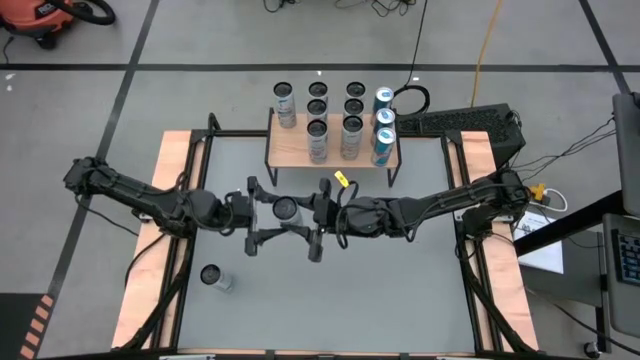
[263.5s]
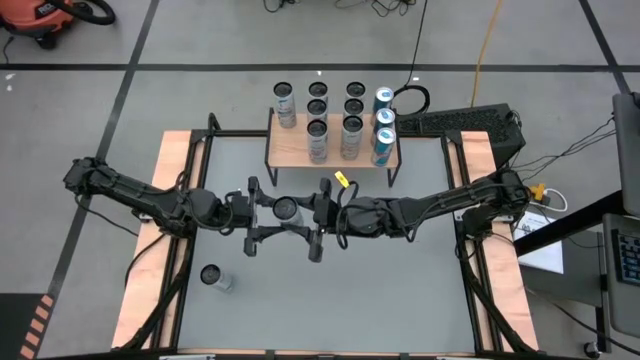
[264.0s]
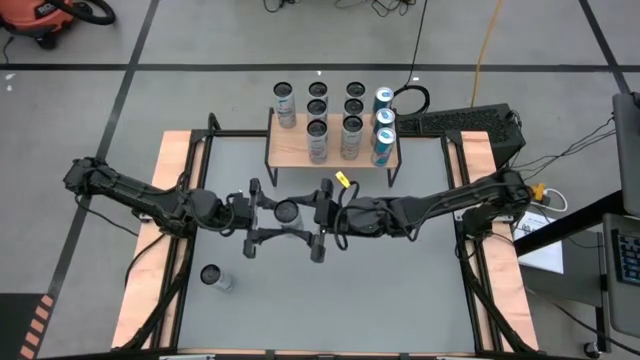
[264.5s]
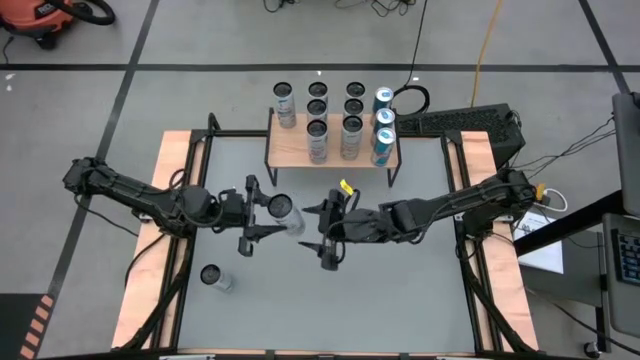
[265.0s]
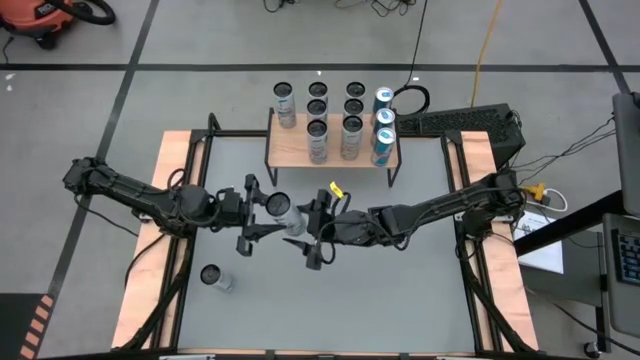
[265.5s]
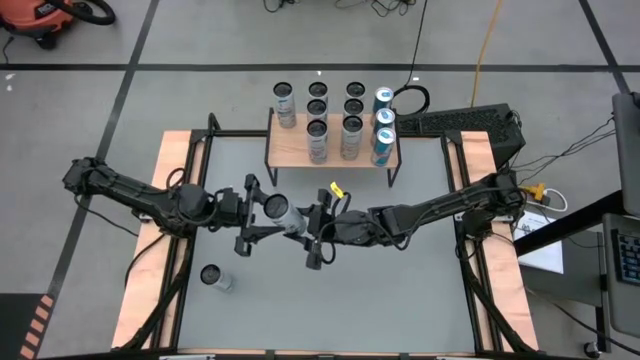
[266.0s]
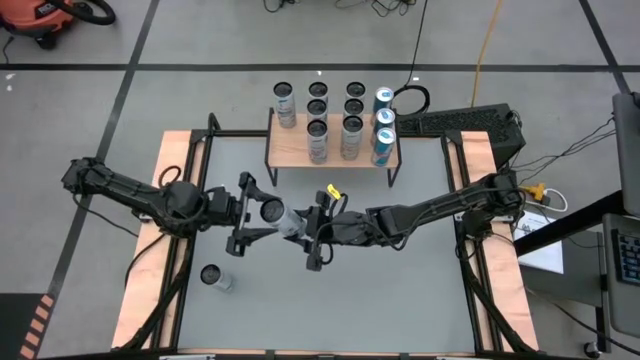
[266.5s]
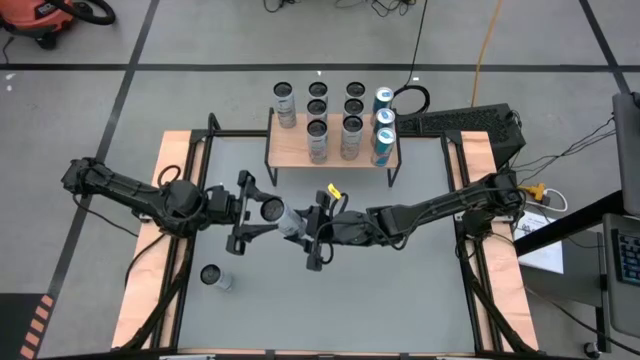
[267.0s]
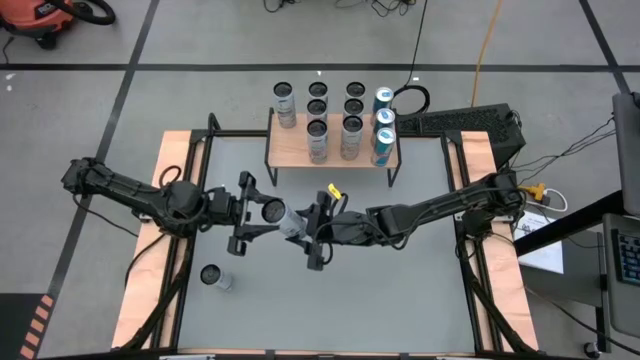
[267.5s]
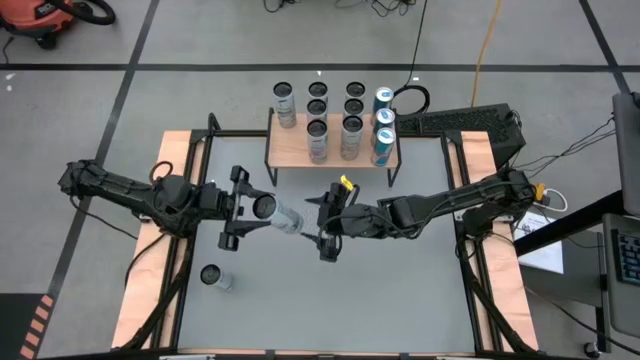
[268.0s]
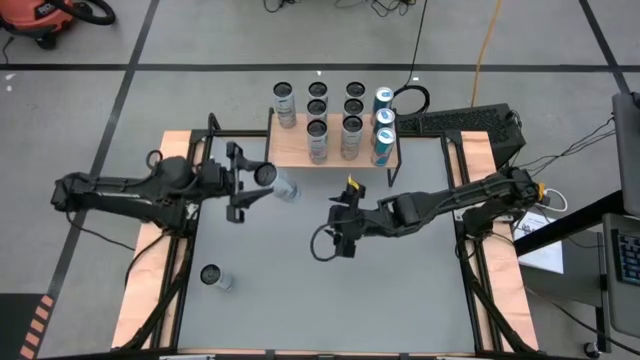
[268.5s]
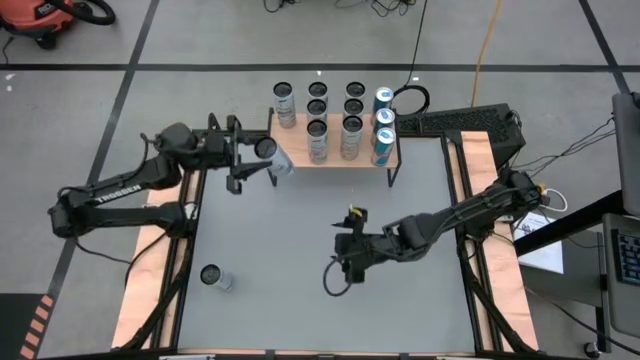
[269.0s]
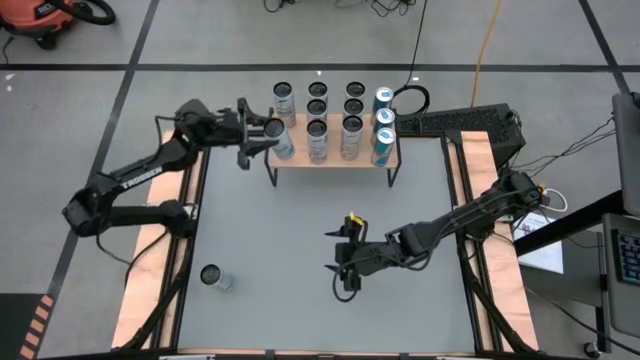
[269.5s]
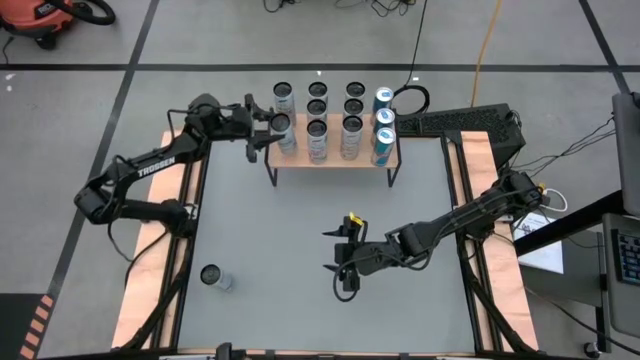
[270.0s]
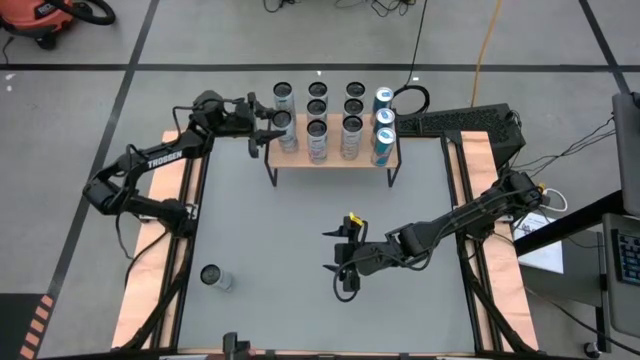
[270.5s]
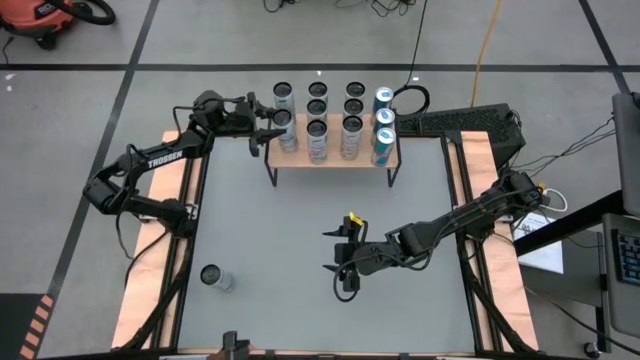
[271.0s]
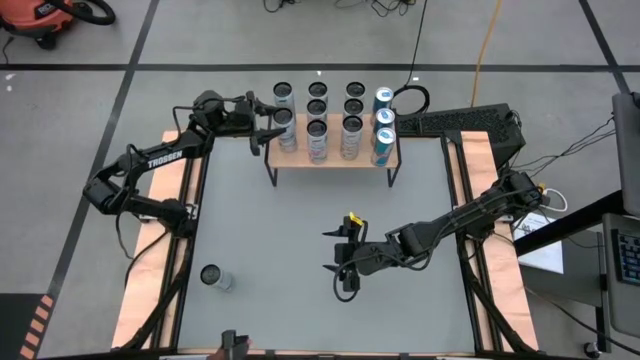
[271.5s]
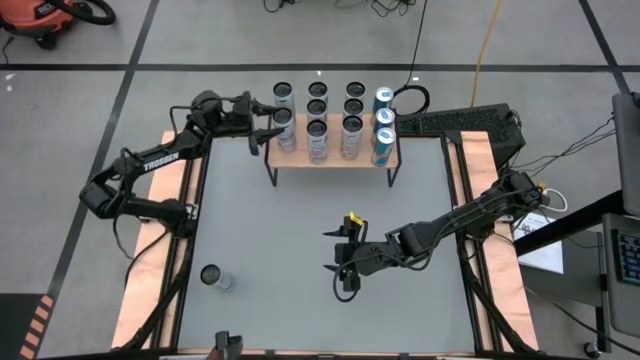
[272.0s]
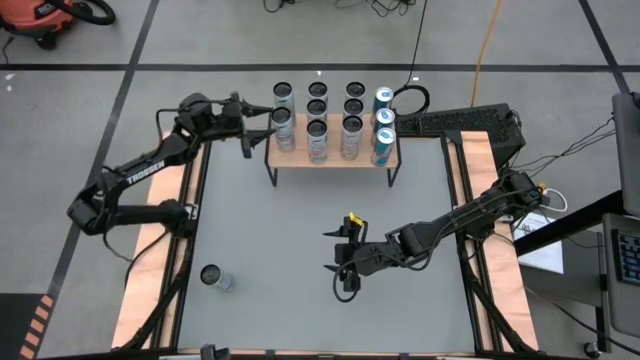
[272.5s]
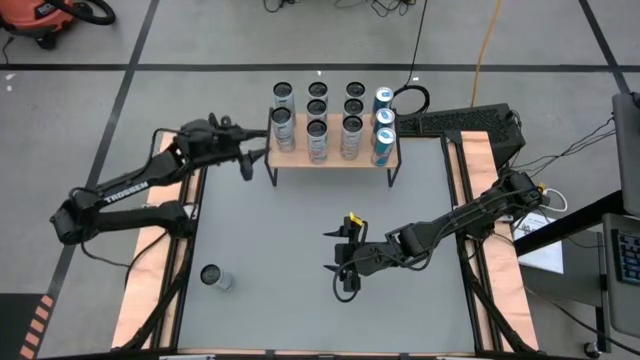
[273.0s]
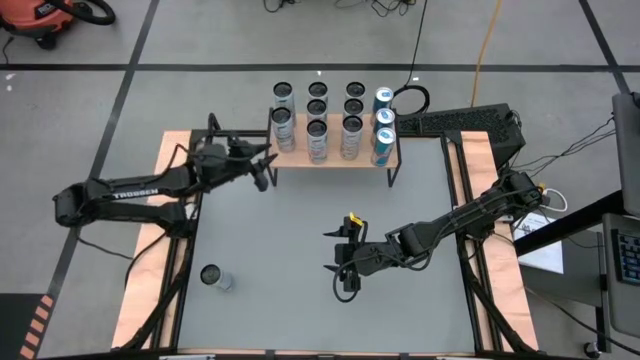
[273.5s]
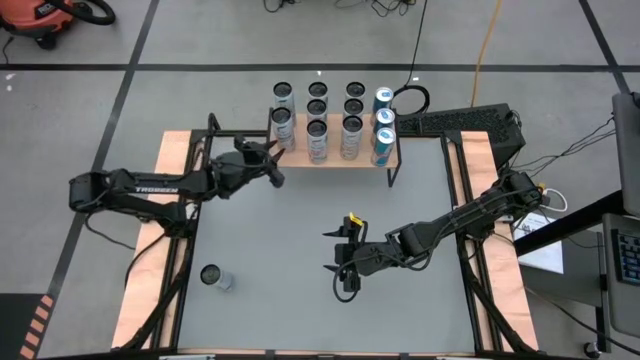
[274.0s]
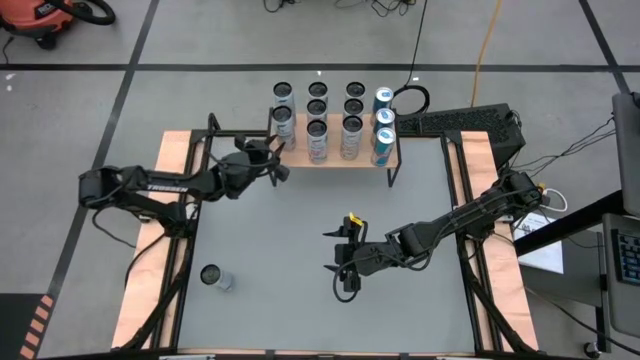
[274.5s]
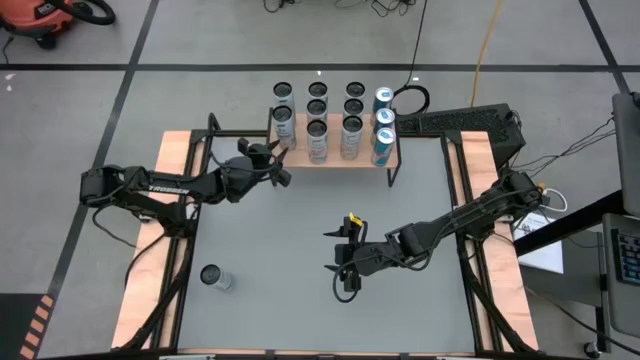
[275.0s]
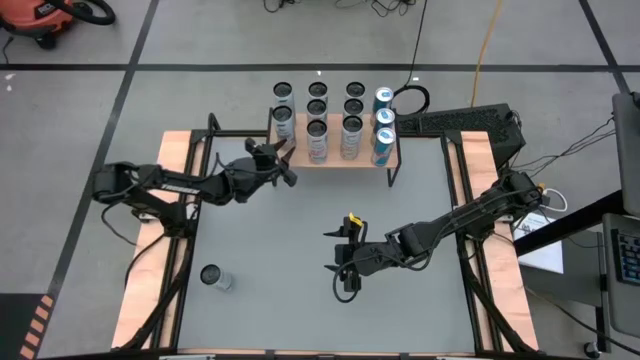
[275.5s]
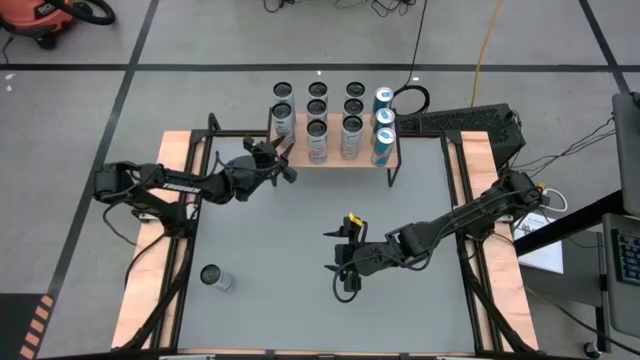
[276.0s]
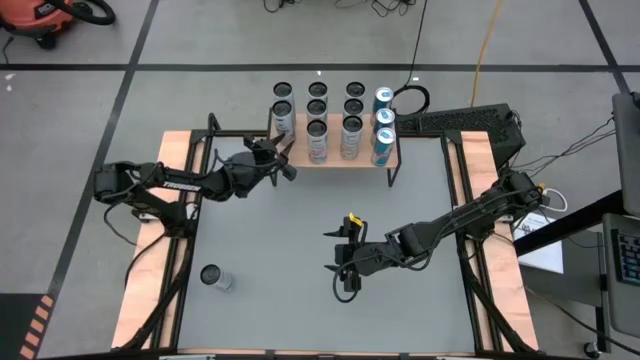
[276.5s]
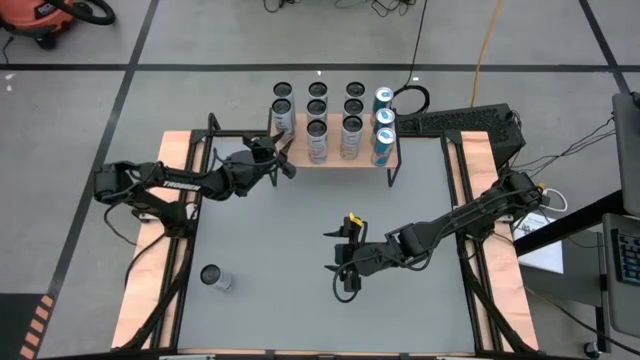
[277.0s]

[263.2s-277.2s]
Task: Place canned beverage on shelf
Put the right white blue soda can on the shelf aligned with the other white blue soda can

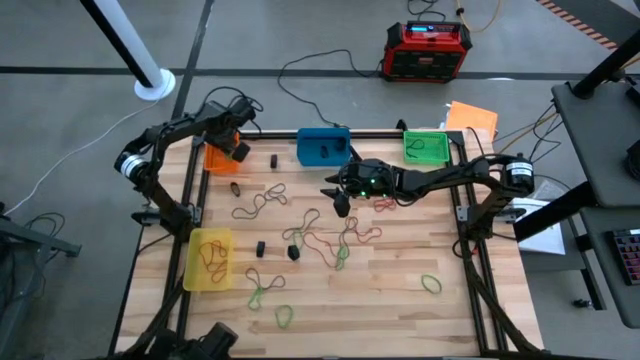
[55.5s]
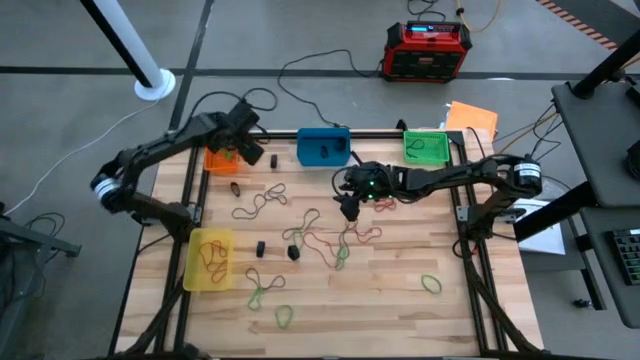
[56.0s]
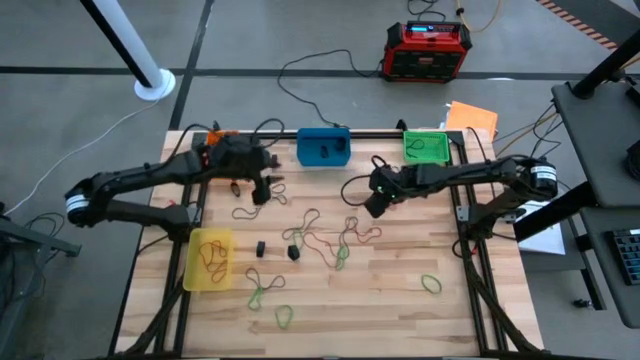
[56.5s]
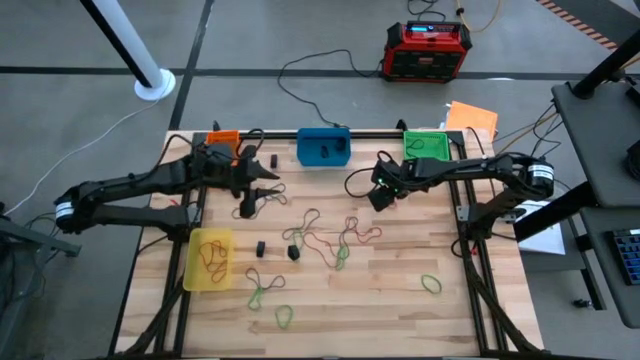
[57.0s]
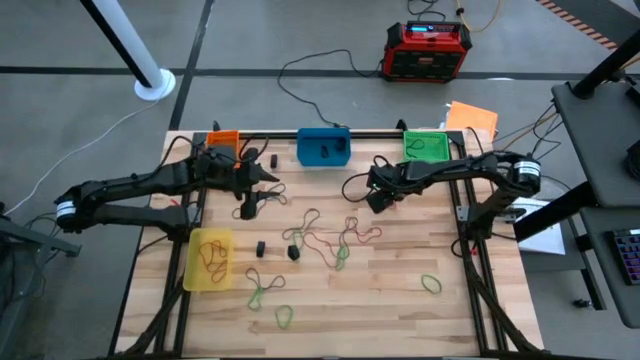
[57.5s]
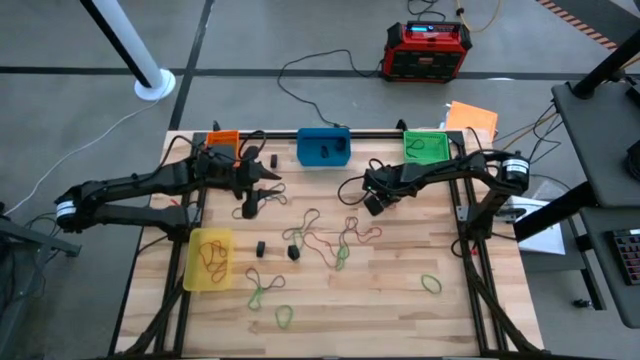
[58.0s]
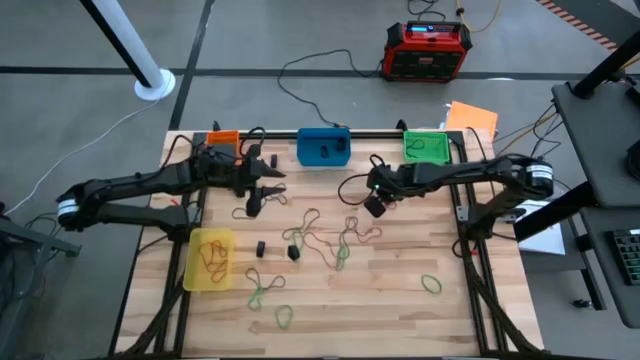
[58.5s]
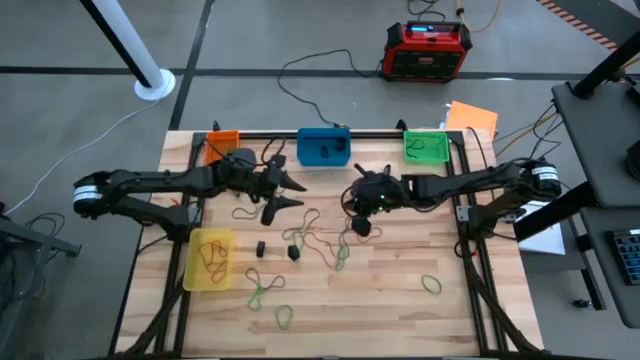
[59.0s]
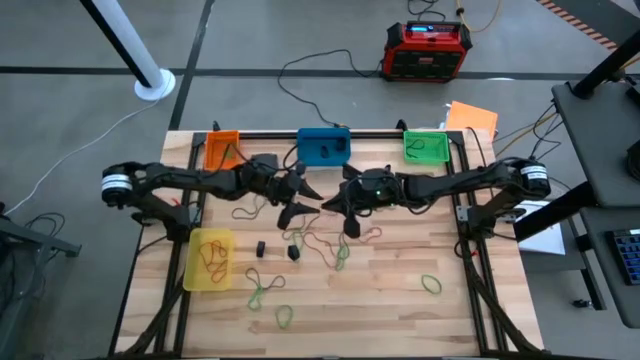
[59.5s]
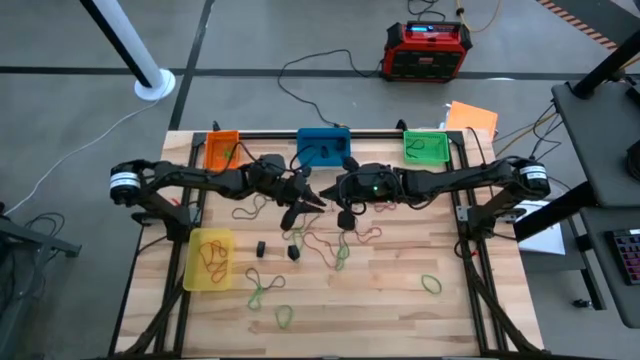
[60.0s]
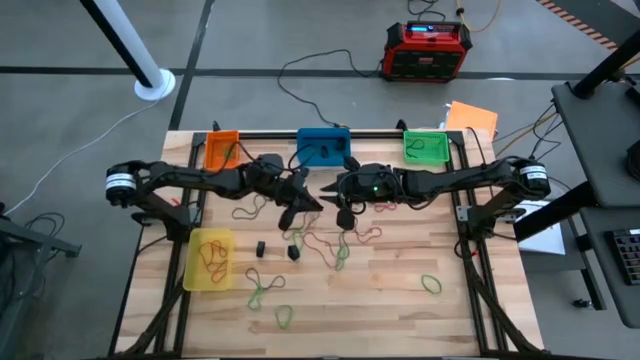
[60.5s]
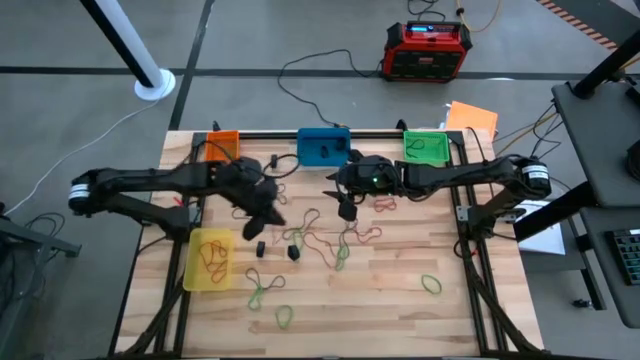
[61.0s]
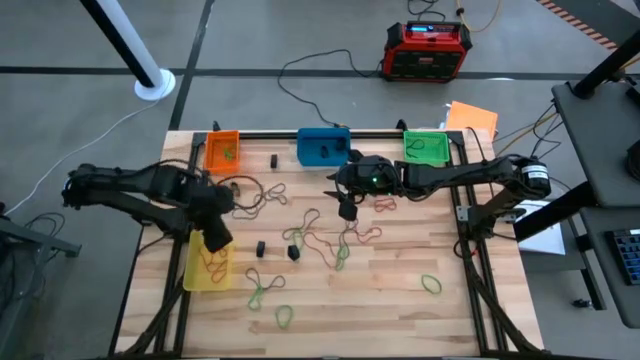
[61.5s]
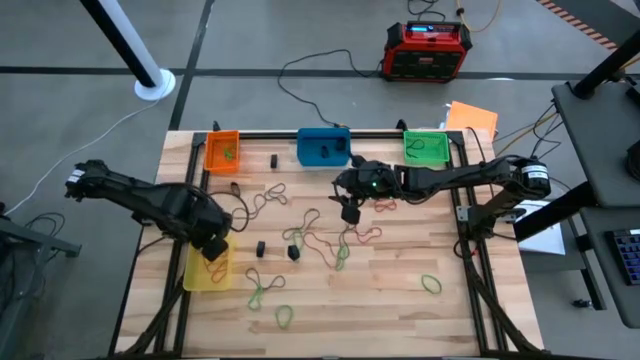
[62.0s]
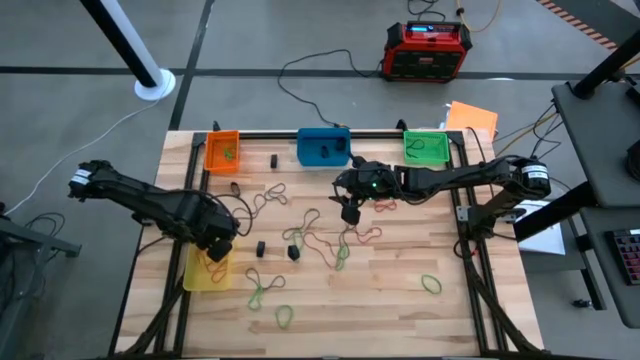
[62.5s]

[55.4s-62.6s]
Task: Sort rubber bands into baskets
Put the red rubber band into the yellow bin
